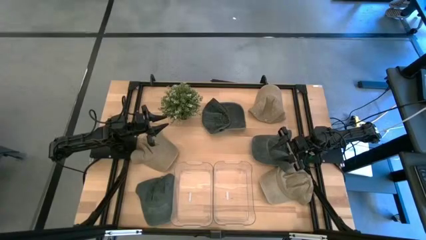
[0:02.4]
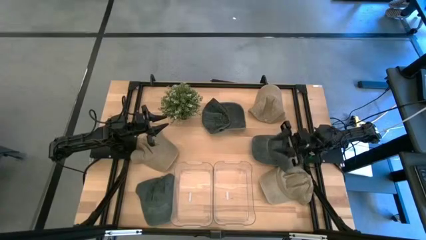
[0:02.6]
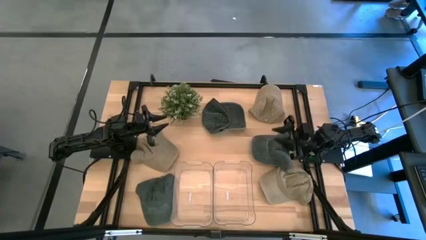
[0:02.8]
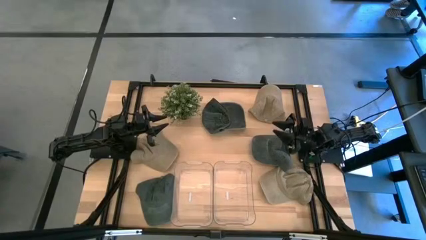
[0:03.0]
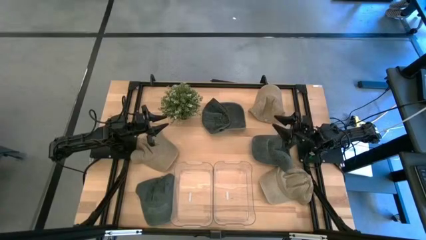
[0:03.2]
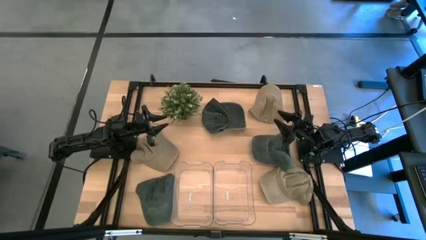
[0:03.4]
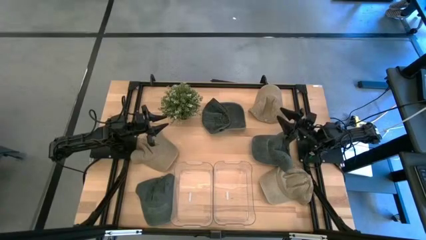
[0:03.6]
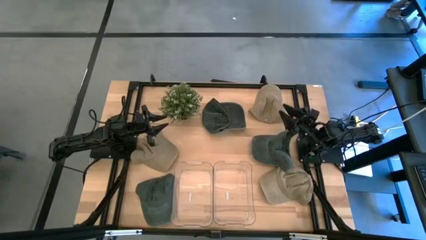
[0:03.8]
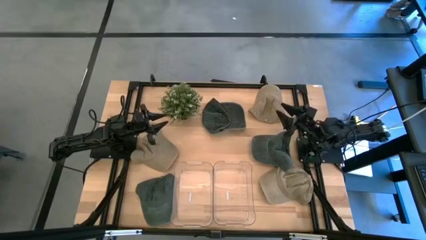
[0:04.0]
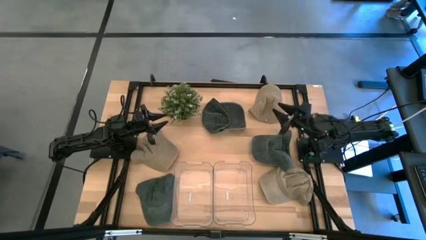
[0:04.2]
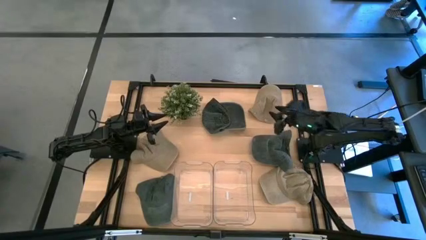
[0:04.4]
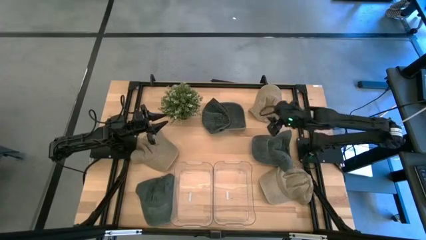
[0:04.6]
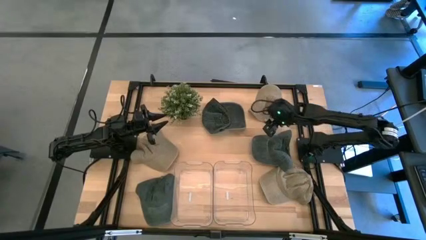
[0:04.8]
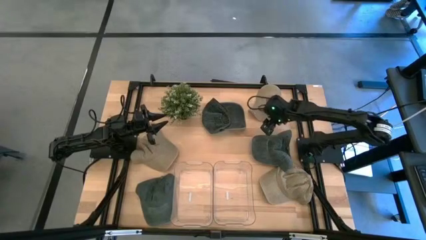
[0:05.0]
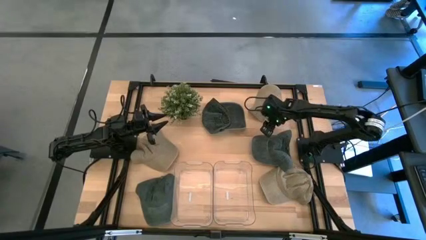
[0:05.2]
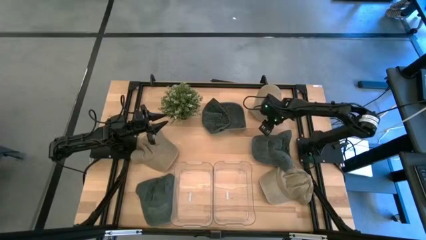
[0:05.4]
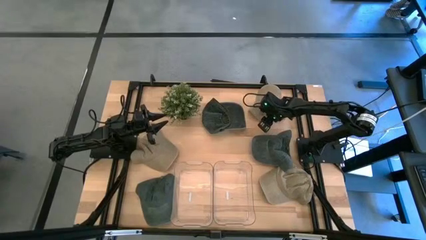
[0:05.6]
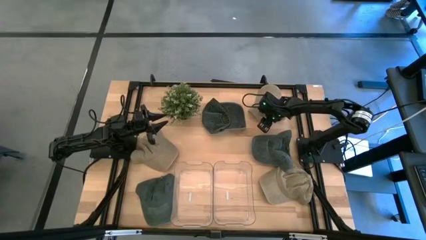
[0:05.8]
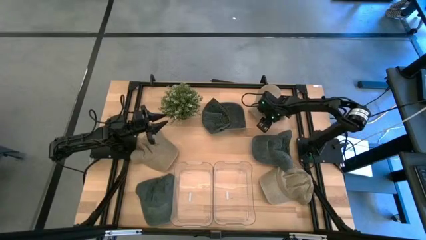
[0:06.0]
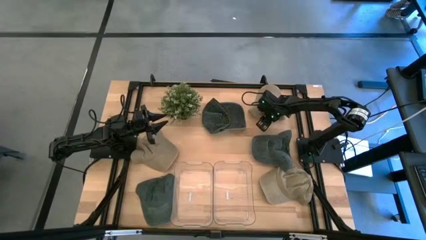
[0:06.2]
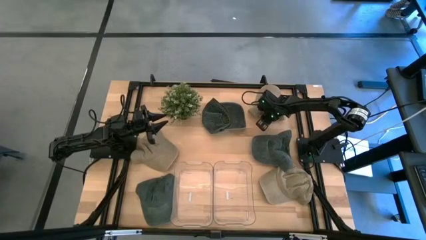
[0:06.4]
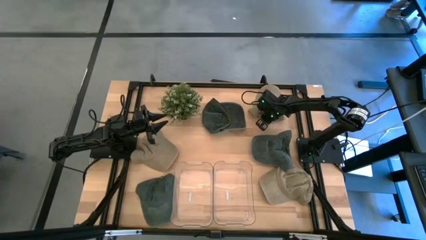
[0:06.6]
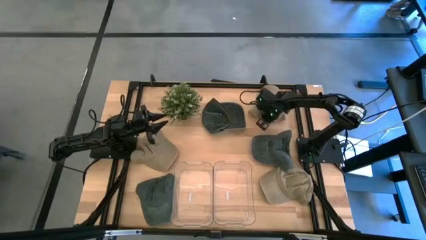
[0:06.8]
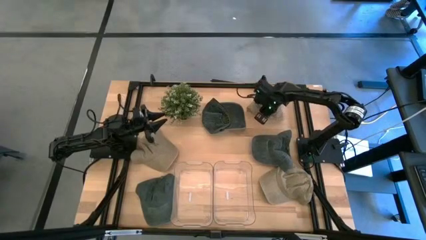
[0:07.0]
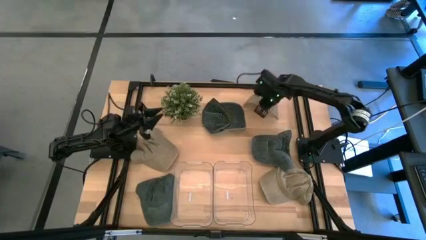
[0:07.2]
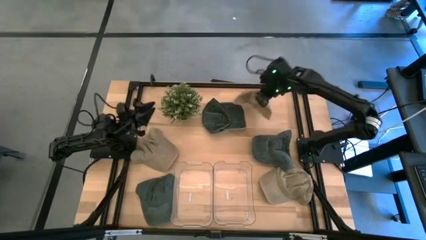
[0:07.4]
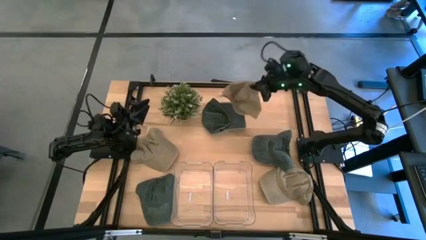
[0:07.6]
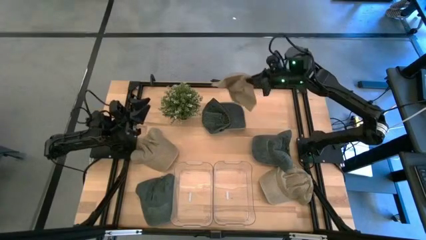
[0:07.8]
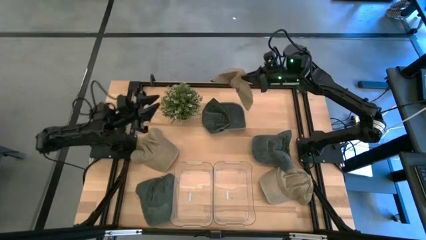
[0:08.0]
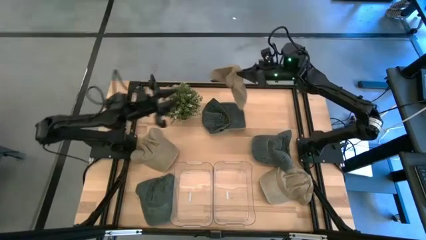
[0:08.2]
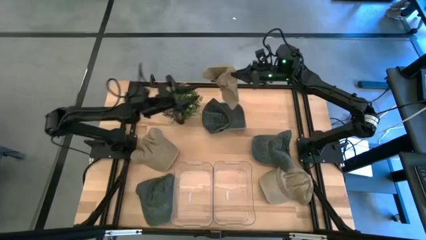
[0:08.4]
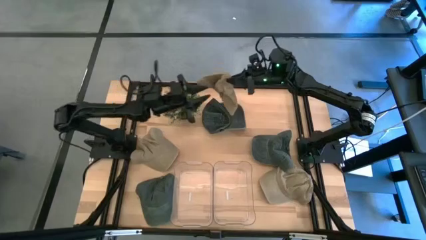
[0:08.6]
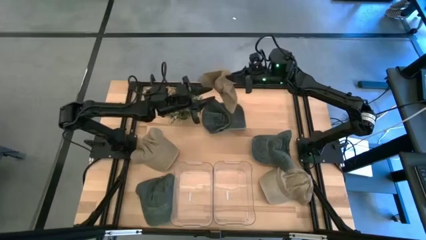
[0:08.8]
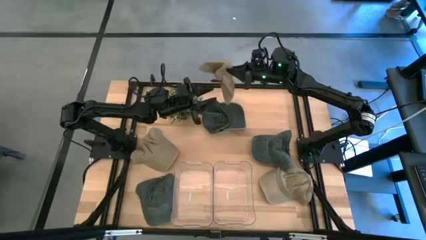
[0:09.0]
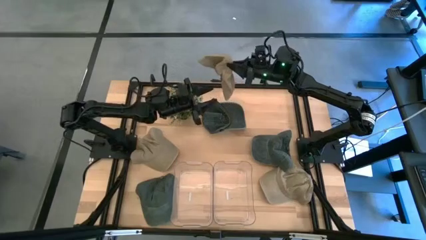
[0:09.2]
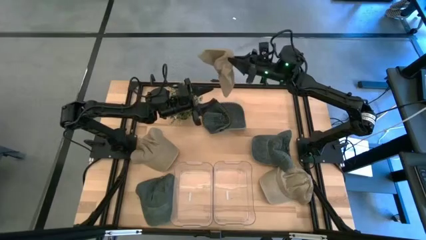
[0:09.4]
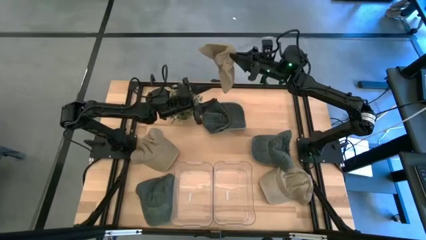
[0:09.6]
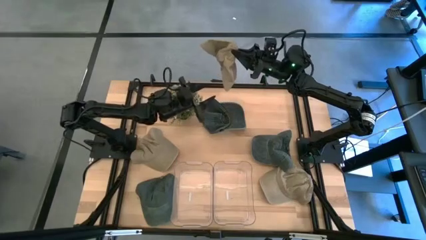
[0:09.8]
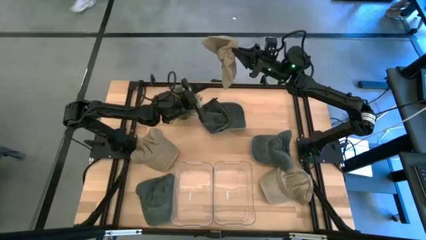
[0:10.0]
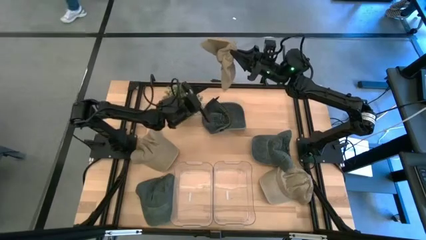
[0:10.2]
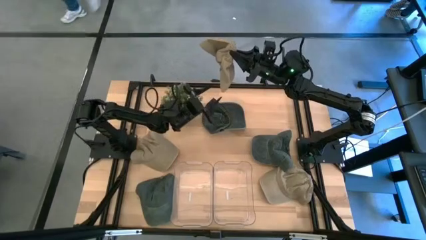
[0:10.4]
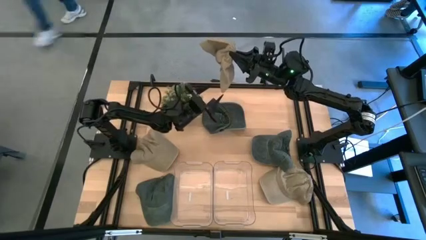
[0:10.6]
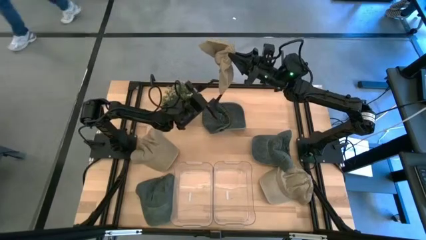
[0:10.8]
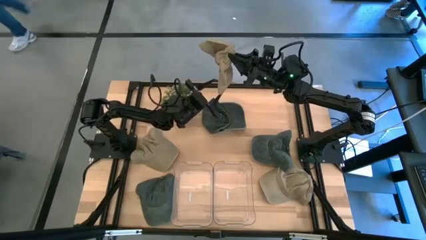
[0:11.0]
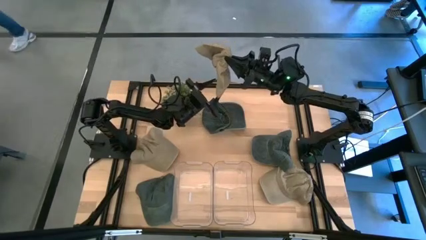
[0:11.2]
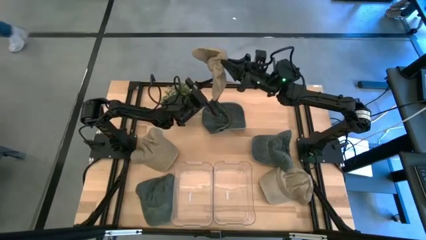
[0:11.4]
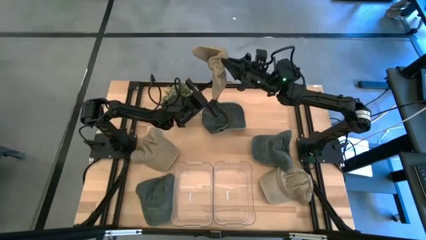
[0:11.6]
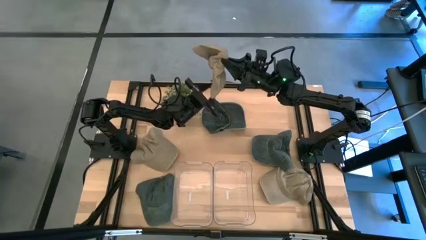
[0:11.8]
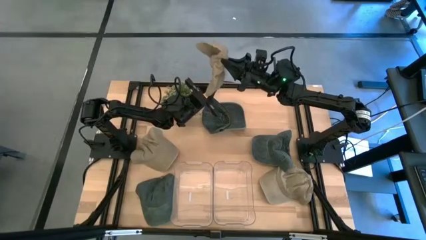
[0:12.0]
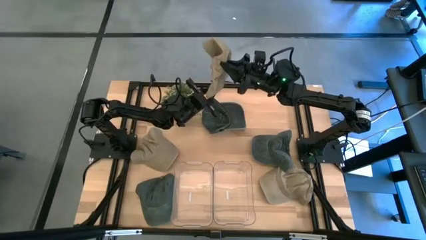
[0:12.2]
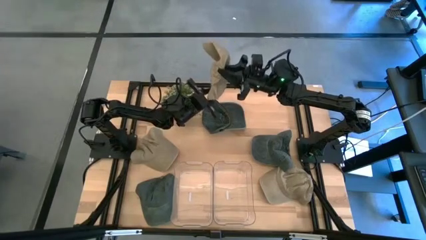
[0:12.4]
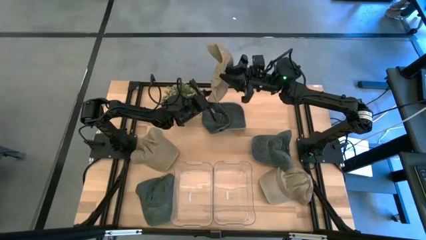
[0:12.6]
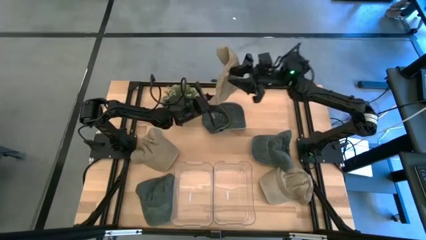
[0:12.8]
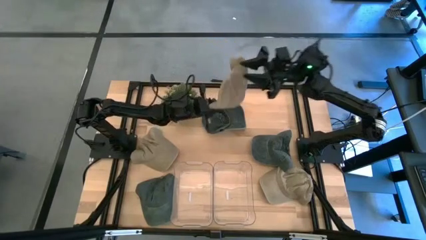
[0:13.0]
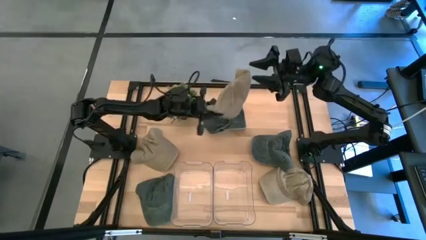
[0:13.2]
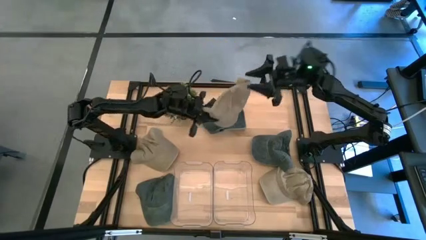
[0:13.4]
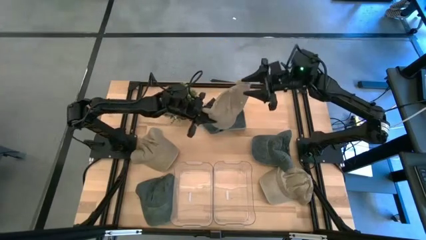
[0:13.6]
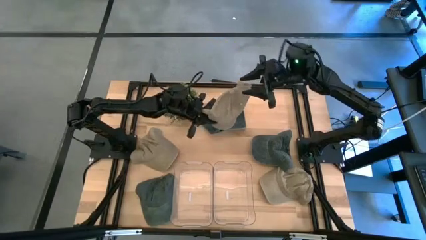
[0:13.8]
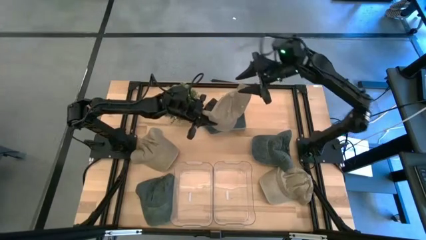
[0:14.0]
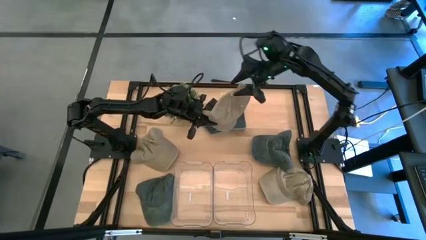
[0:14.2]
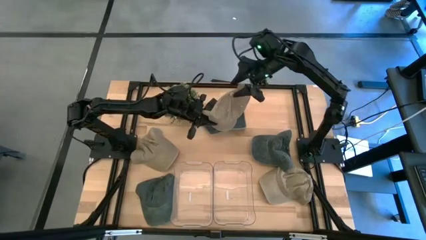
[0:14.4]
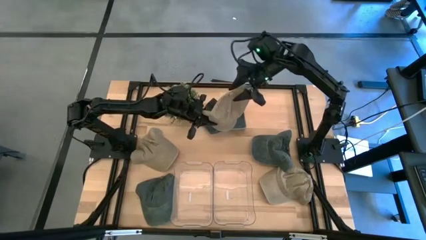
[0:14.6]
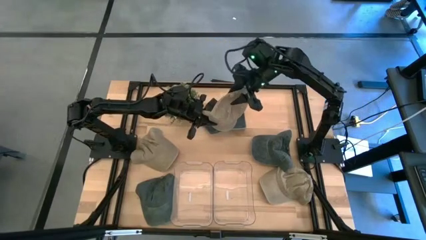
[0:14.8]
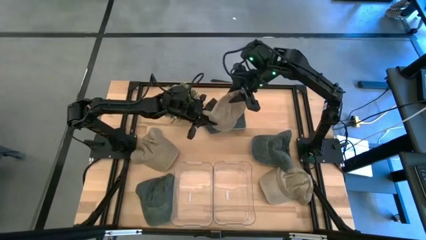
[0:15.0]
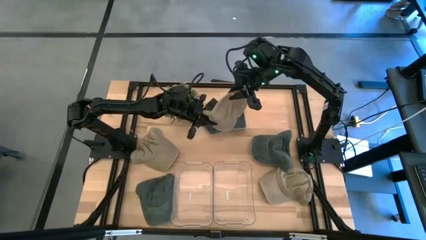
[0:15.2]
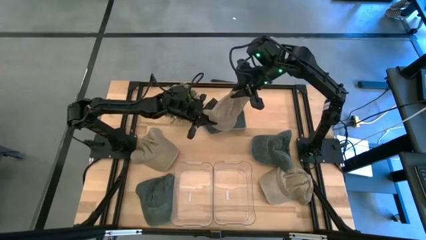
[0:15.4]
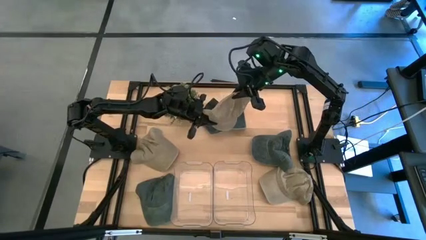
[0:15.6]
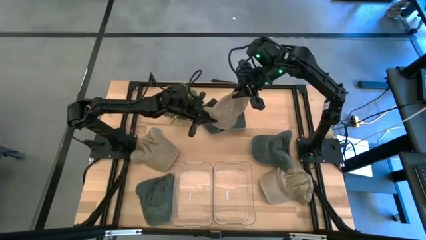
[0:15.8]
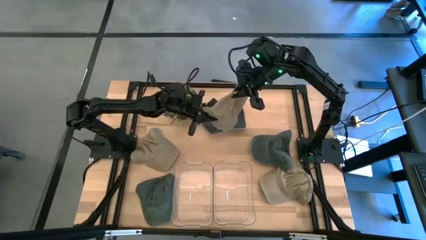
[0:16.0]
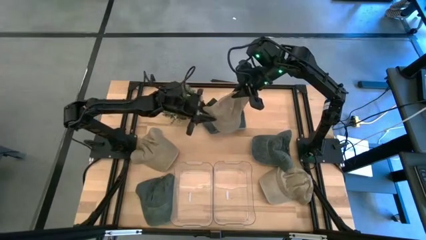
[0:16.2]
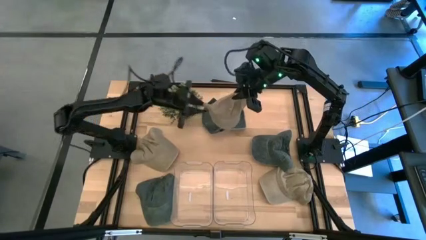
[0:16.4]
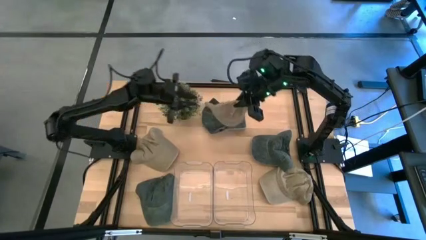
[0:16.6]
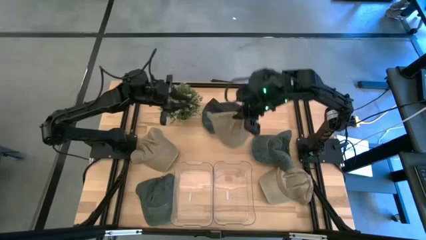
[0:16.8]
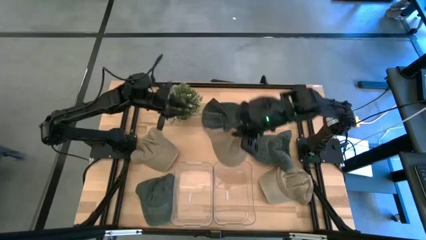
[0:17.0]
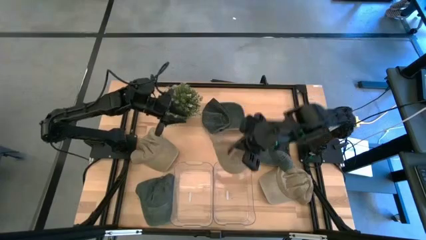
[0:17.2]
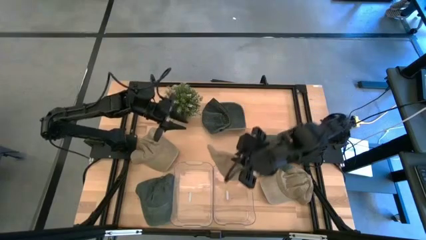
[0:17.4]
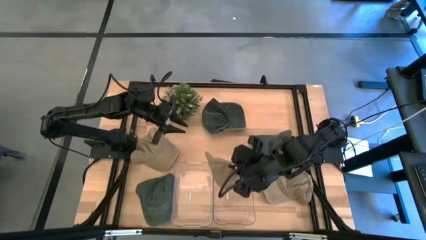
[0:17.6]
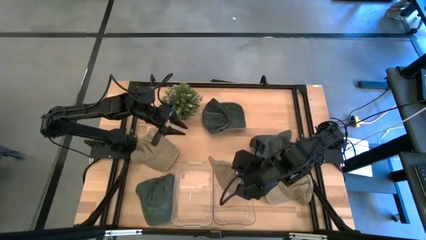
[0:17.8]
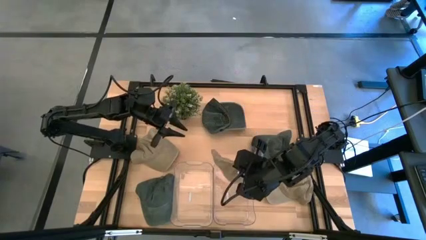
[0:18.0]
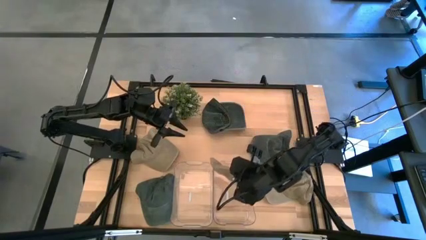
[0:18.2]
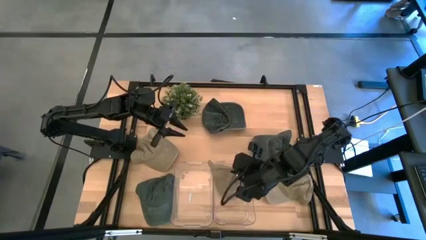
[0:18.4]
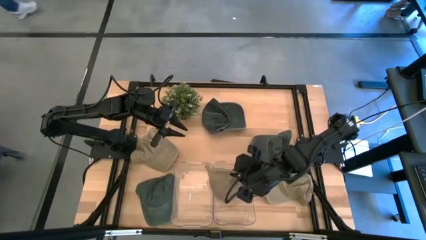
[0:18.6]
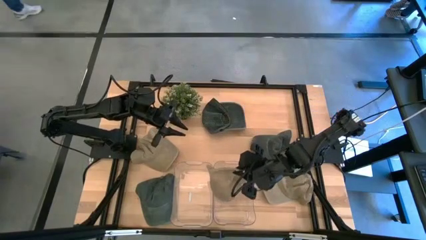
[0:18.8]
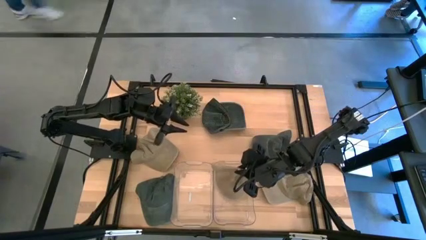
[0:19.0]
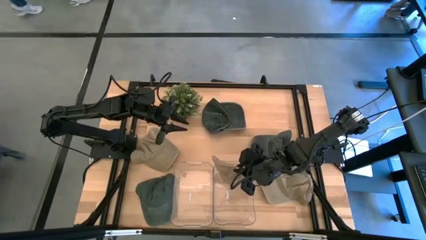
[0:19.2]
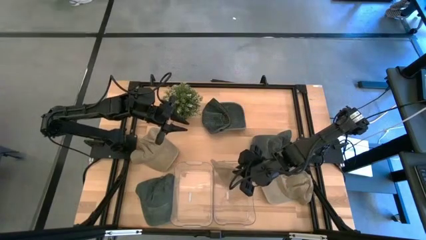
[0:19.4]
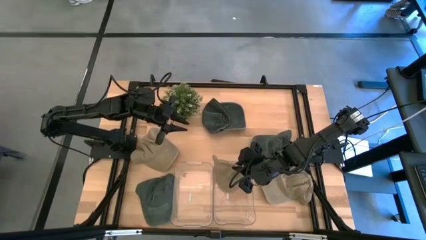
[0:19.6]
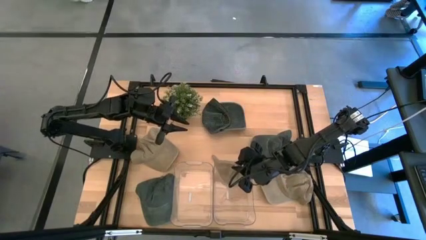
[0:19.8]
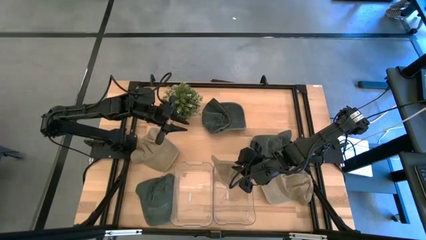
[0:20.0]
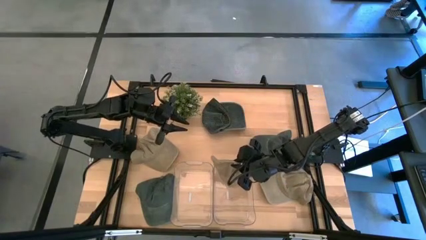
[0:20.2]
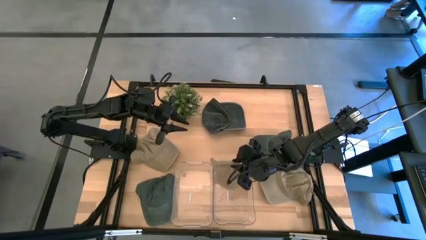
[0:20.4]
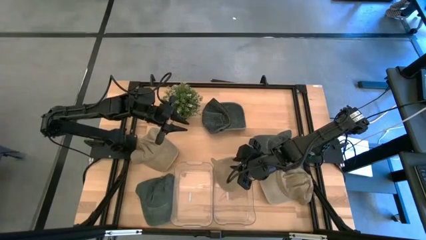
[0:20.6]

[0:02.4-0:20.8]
Task: Pick & Place hat
Put the top brown cap into the right transparent bin
